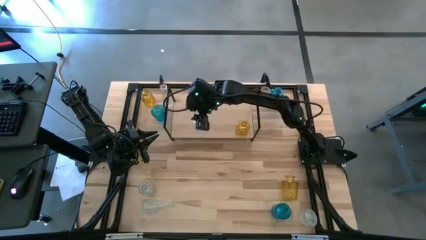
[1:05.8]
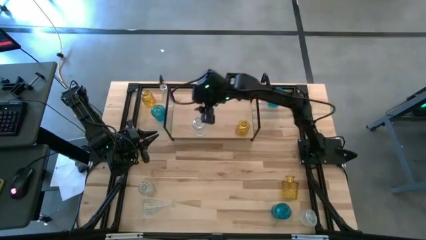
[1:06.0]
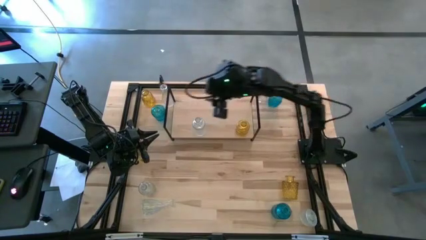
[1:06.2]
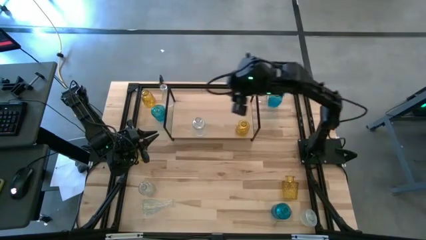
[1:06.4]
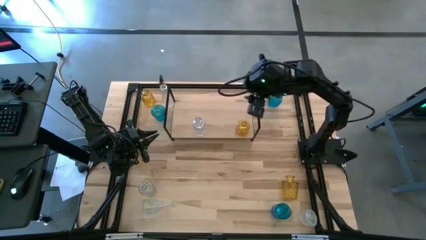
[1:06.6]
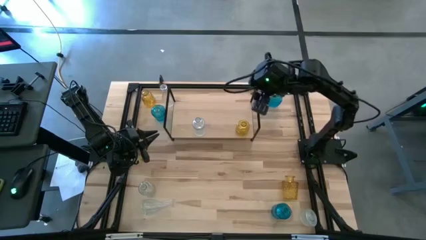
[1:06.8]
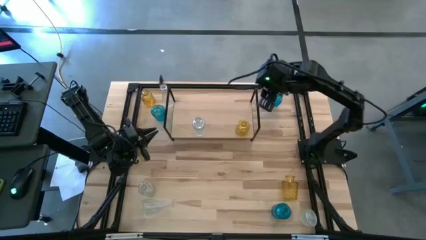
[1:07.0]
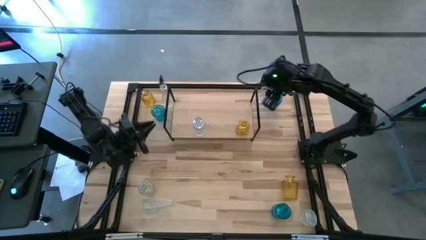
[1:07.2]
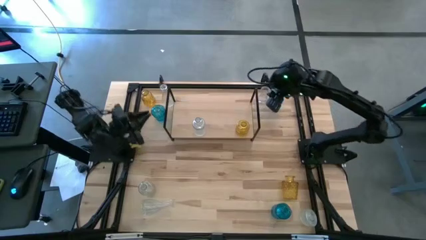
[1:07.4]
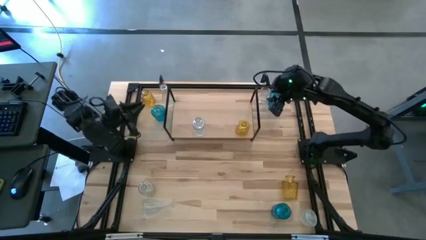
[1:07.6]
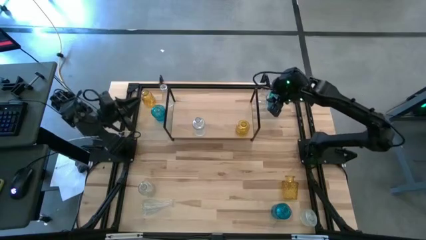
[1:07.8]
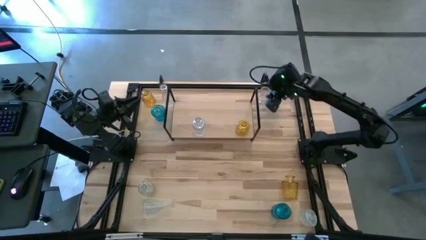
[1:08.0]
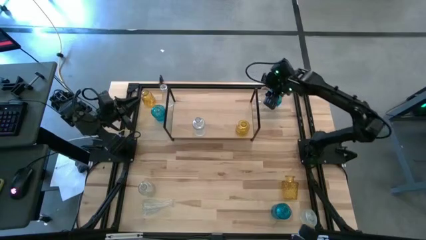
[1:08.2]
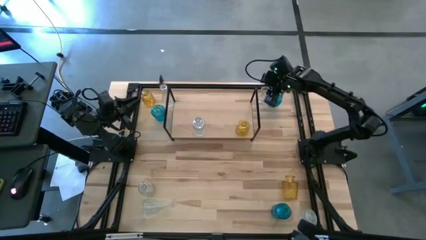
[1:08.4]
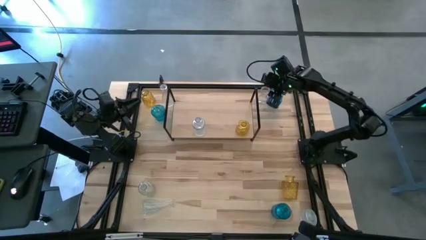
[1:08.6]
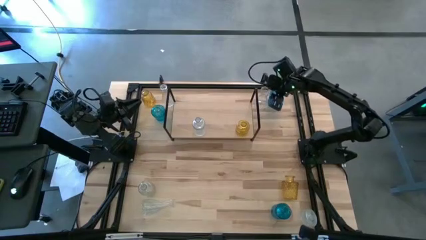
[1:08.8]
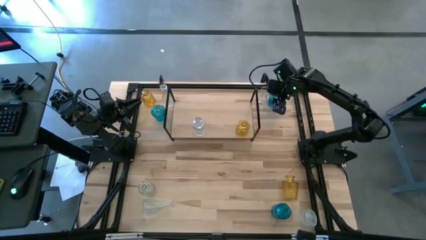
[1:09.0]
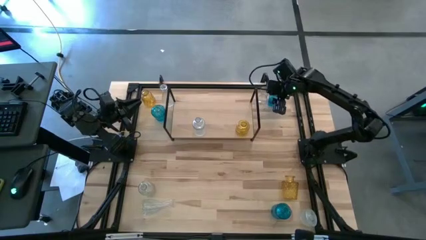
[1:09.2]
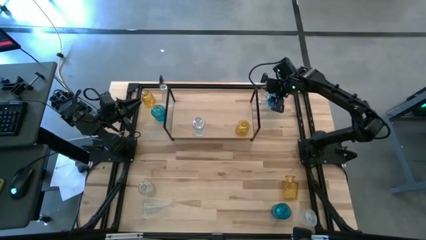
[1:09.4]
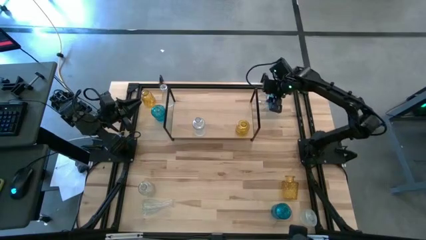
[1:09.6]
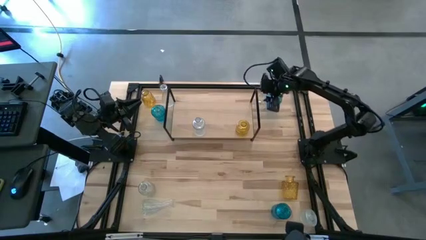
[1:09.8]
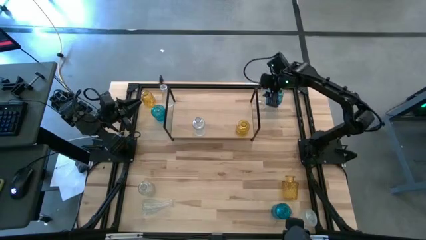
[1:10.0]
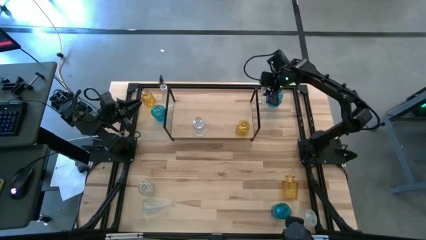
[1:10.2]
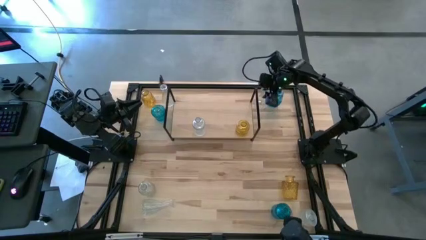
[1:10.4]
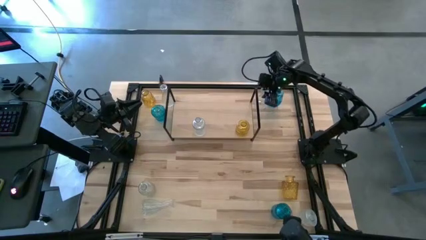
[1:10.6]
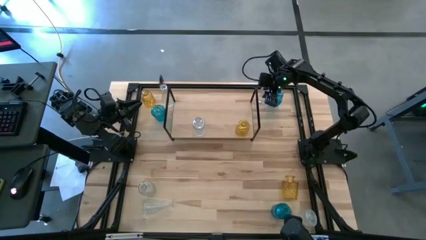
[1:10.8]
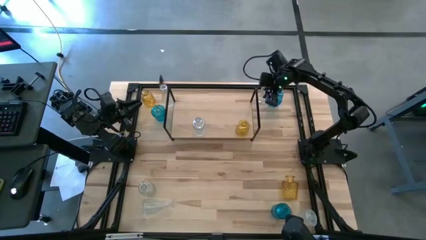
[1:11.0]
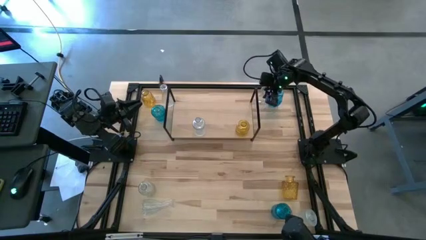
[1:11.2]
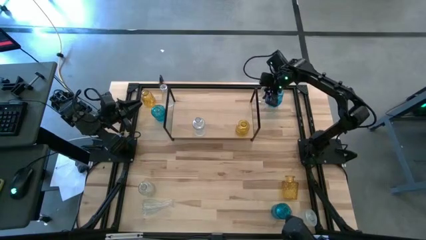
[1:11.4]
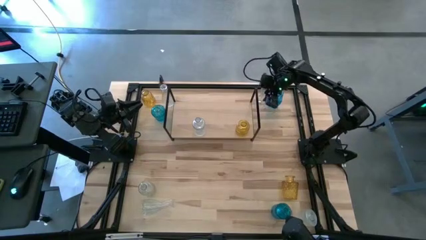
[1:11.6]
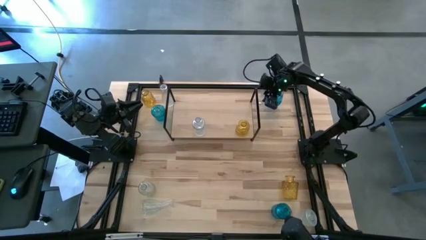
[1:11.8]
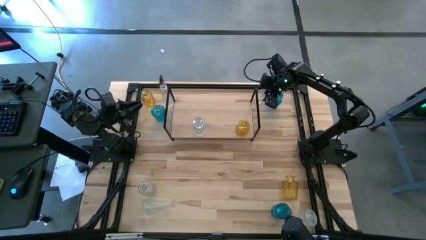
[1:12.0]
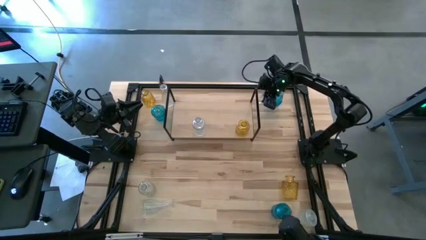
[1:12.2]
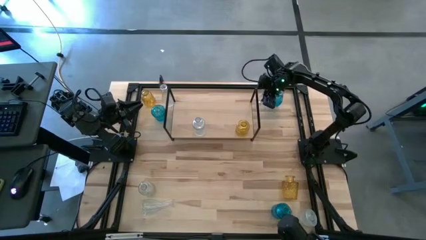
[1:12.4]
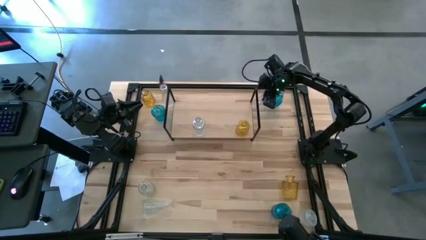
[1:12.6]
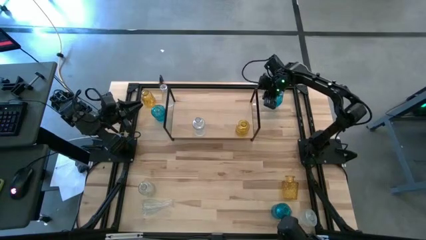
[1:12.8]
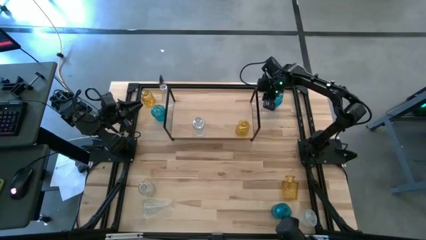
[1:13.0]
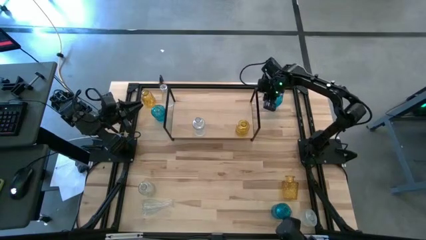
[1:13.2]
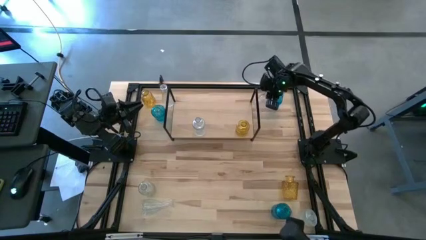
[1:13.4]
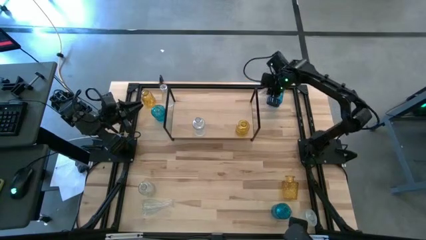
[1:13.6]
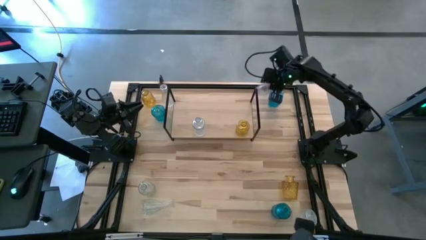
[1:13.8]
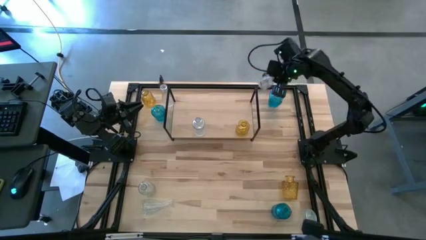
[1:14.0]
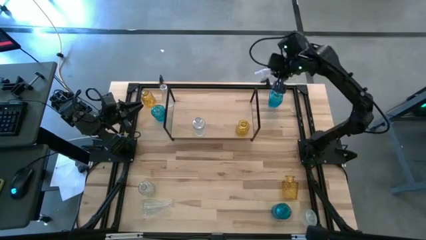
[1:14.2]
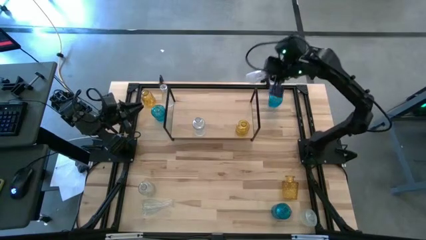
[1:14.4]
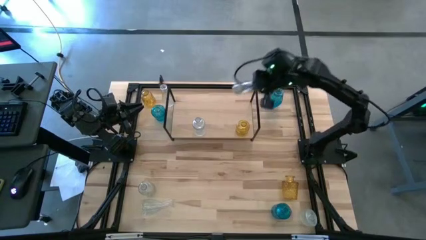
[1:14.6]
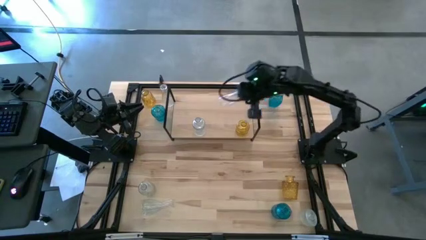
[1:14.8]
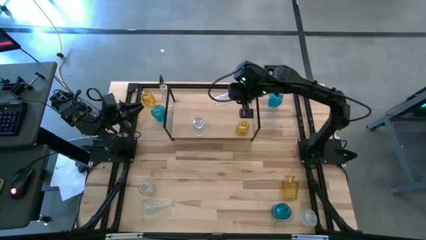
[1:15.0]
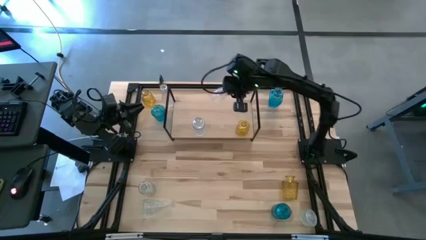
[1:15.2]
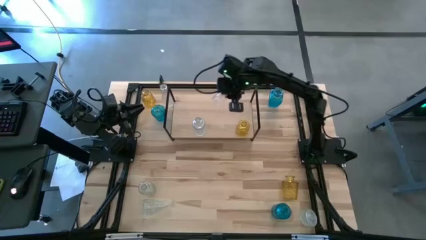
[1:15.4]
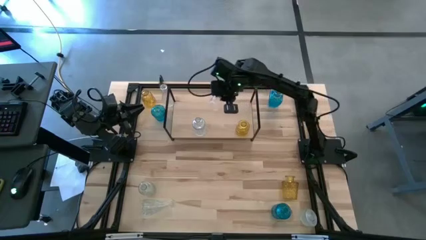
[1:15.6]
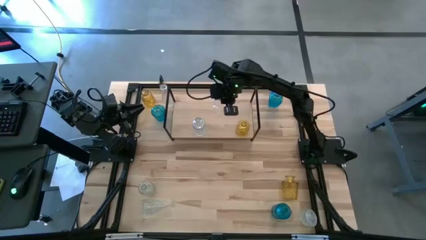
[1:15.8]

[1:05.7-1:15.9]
Task: sort vases onto shelf
Put the transparent vase on the shelf aligned with the other transparent vase
